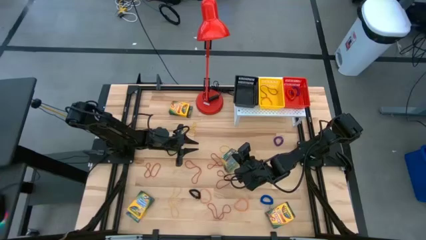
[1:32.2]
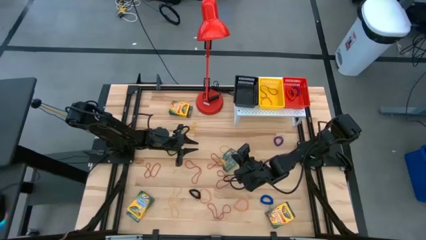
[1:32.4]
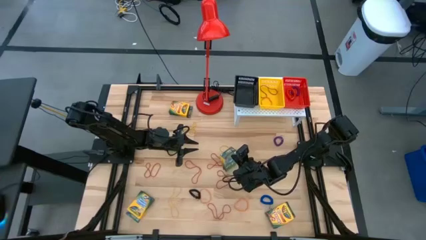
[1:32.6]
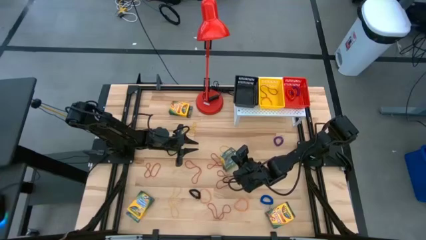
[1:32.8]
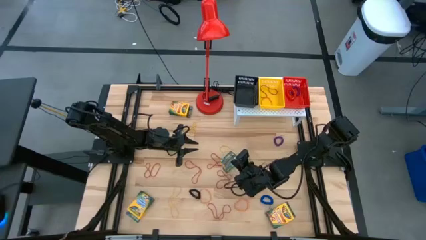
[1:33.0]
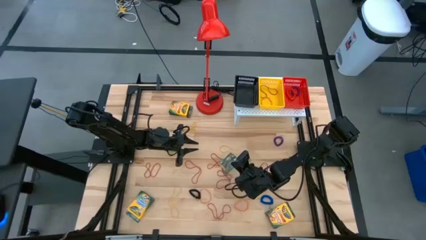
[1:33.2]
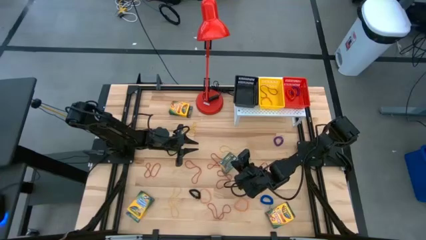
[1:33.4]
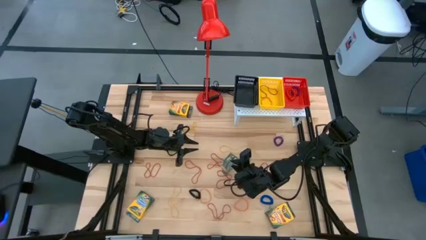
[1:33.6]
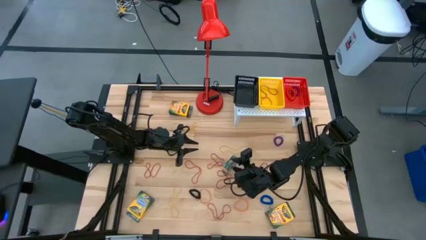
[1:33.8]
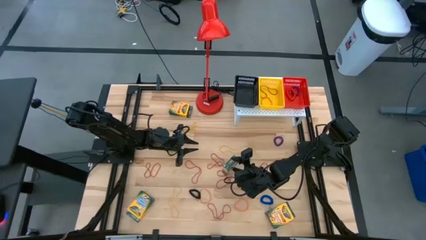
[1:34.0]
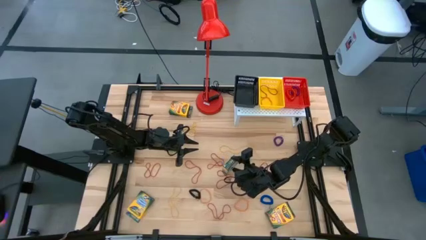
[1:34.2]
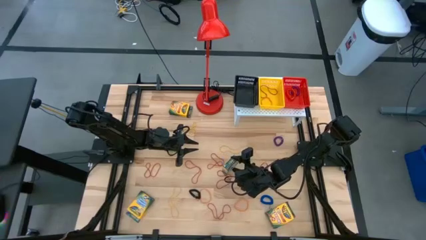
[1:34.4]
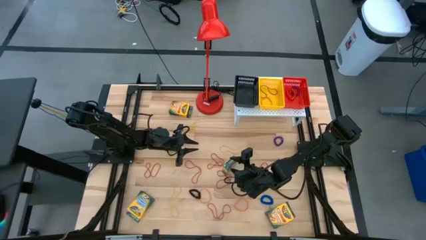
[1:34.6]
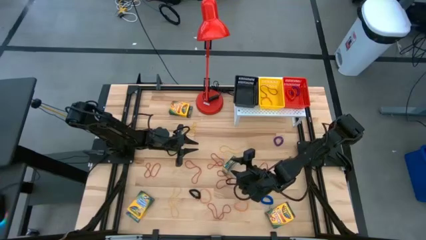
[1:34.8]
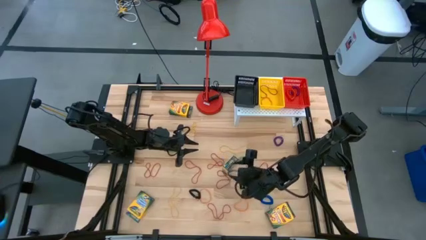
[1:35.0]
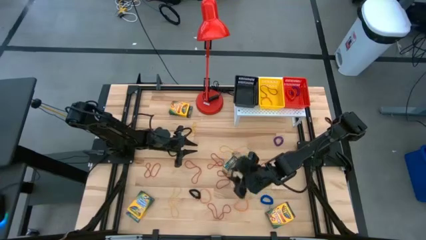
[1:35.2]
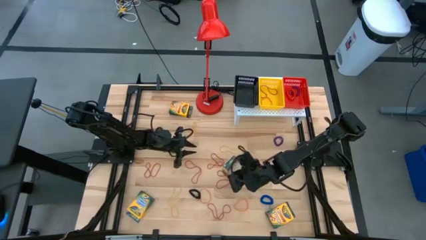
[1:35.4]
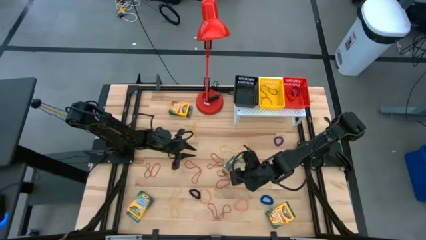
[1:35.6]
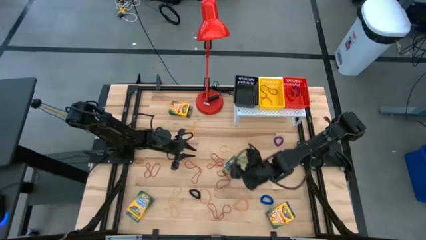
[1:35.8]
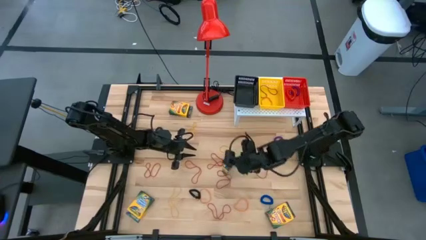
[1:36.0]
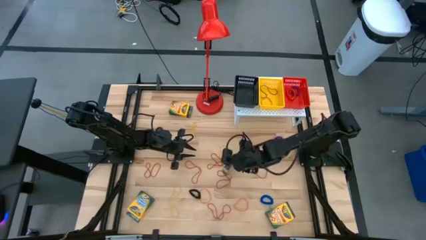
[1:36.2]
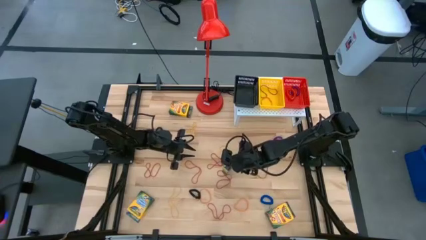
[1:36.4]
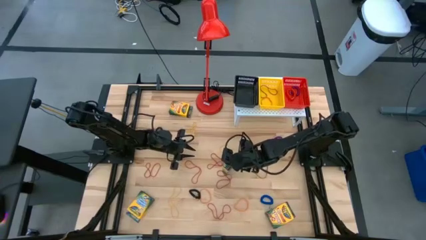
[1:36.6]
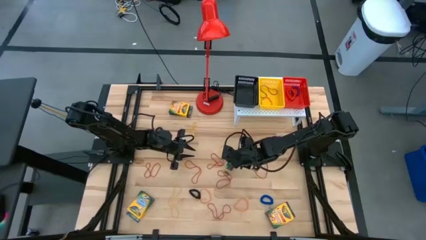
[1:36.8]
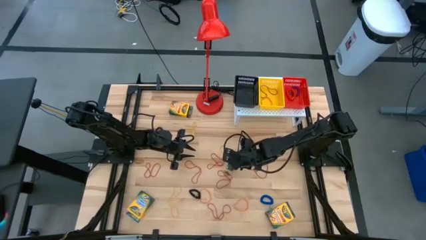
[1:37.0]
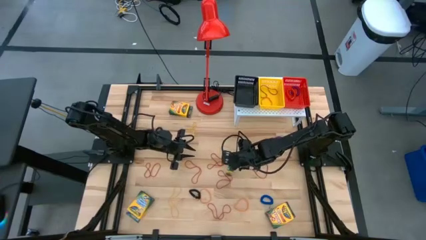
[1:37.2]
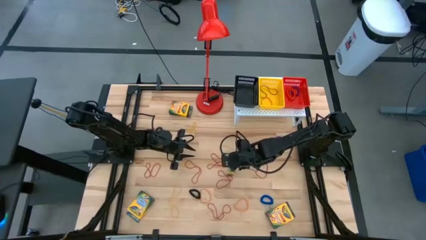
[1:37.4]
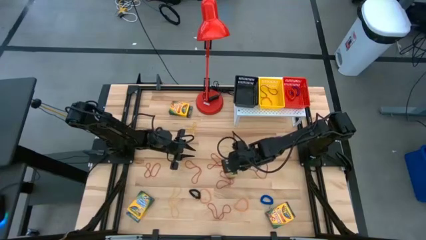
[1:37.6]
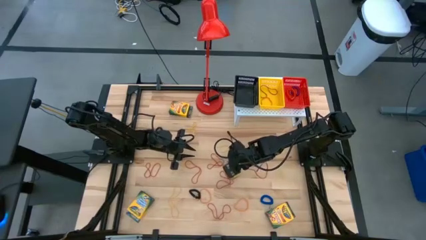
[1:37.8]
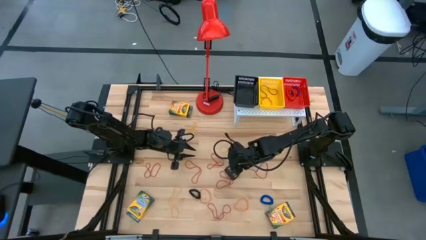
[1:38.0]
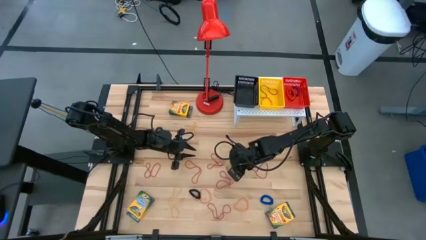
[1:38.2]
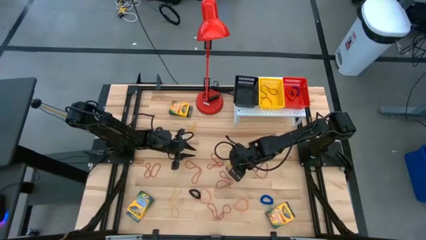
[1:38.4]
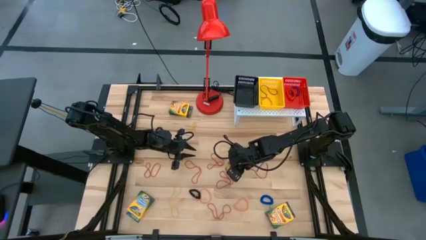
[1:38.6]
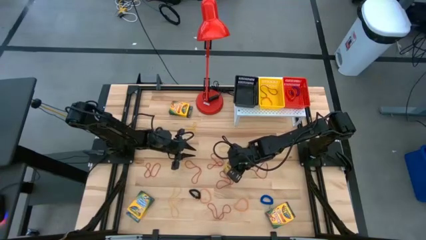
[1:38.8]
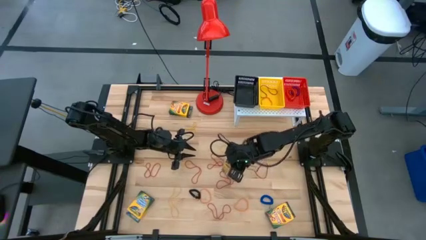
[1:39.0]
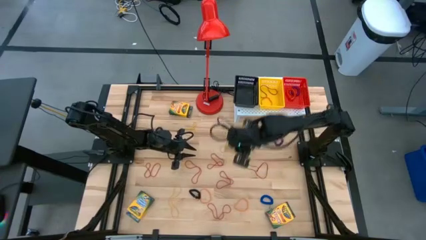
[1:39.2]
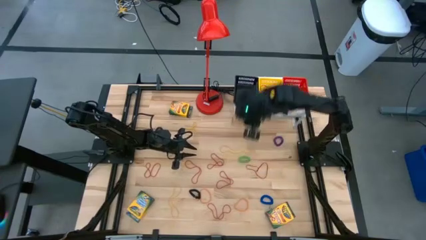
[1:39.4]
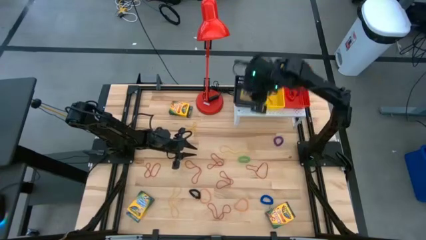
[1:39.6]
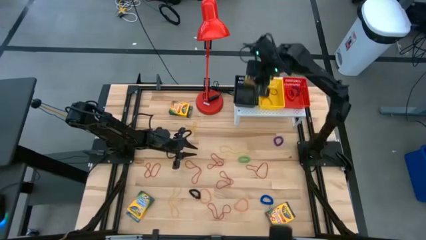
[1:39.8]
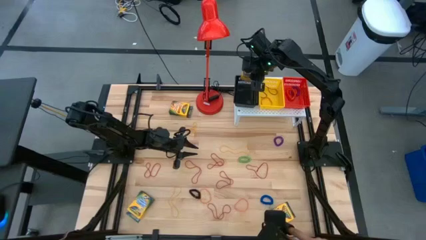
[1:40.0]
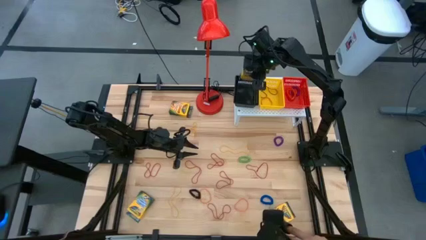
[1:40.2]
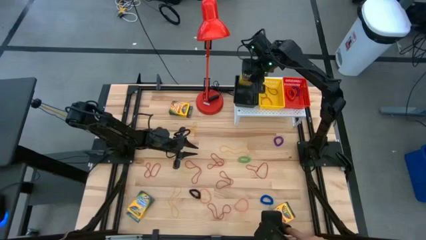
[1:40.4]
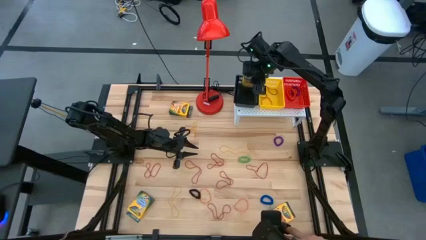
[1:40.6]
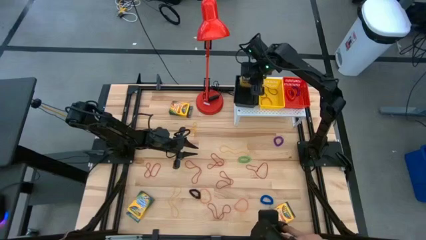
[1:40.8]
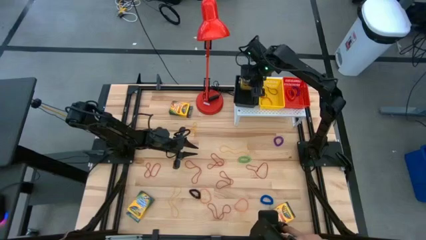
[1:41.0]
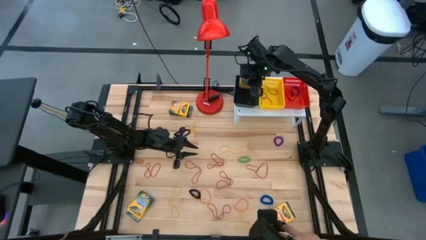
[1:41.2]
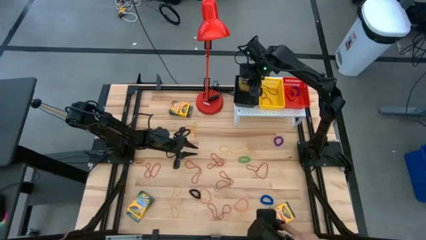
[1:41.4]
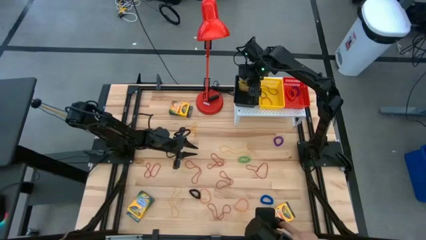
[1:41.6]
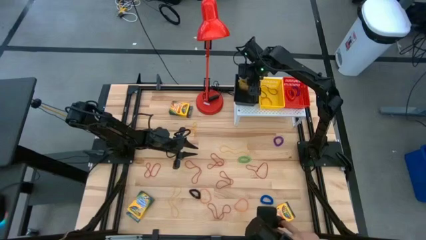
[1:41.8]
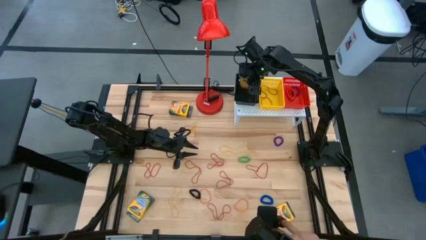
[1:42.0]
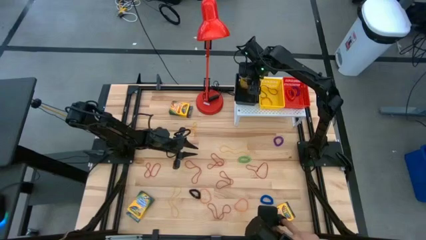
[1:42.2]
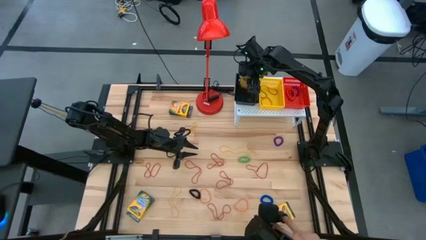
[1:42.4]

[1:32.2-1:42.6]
Task: Pick & Place Office Desk Supplies
Put the crayon box into the black bin

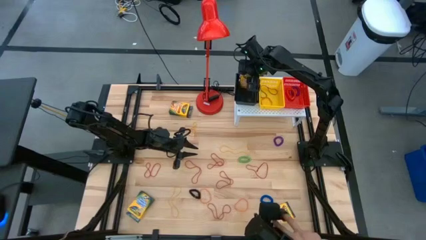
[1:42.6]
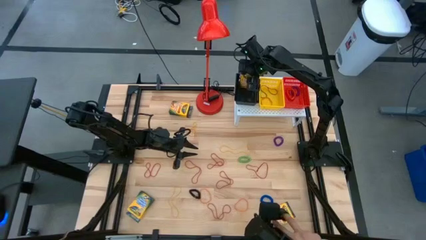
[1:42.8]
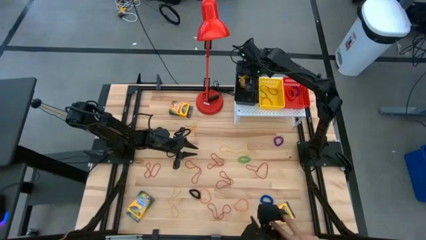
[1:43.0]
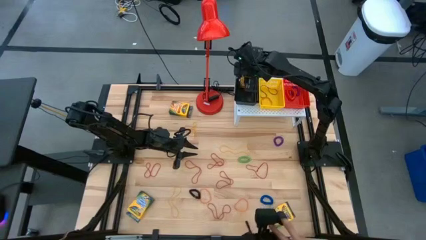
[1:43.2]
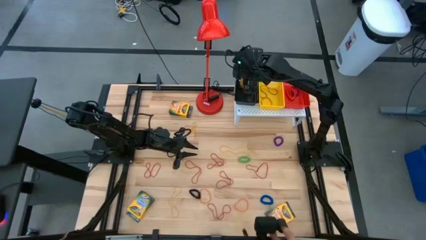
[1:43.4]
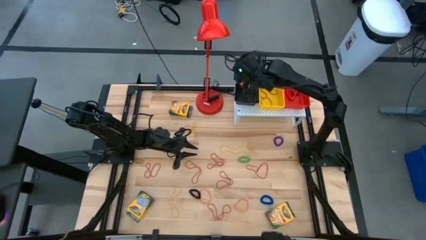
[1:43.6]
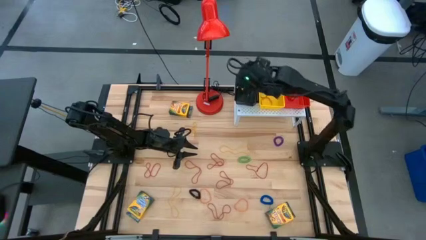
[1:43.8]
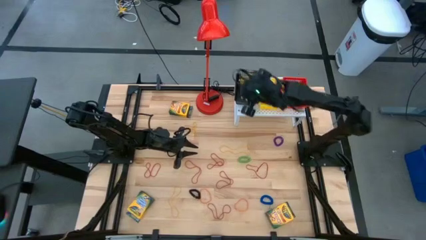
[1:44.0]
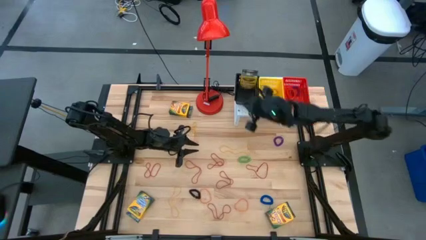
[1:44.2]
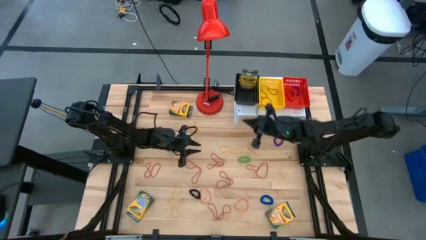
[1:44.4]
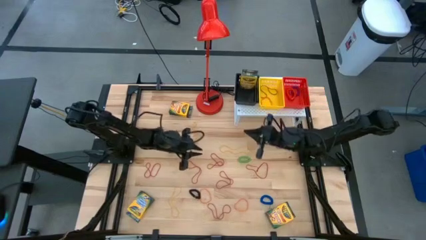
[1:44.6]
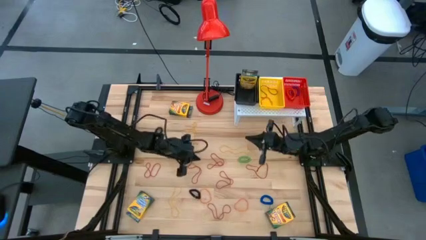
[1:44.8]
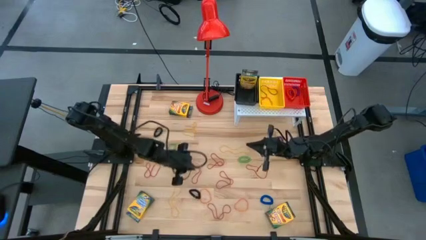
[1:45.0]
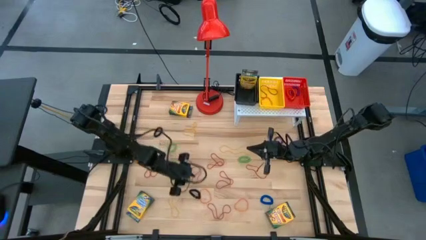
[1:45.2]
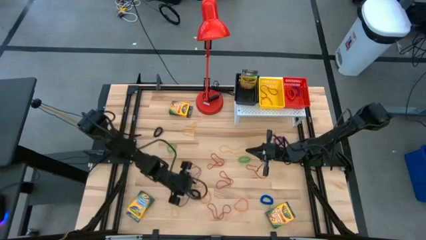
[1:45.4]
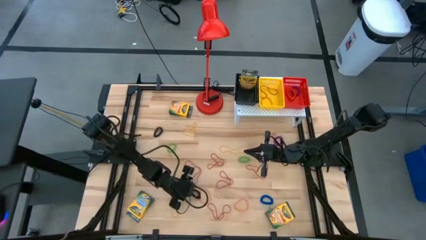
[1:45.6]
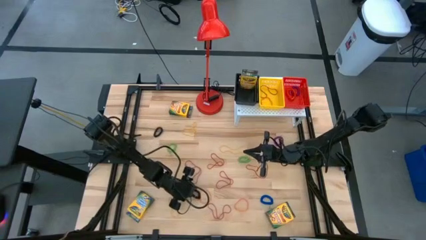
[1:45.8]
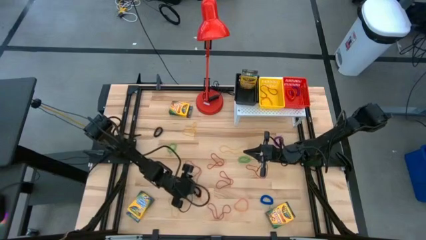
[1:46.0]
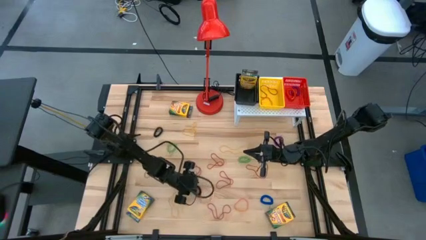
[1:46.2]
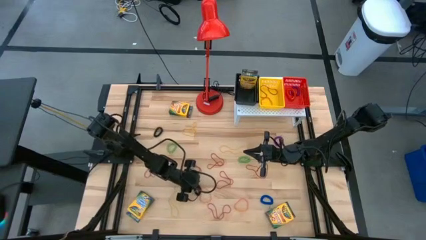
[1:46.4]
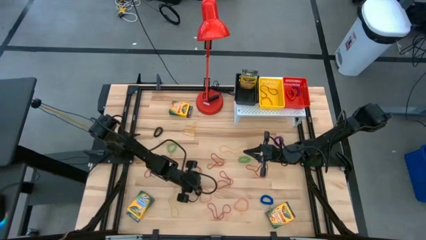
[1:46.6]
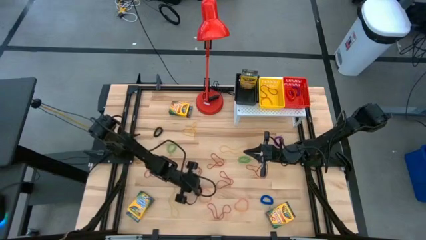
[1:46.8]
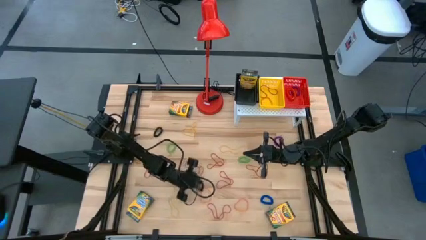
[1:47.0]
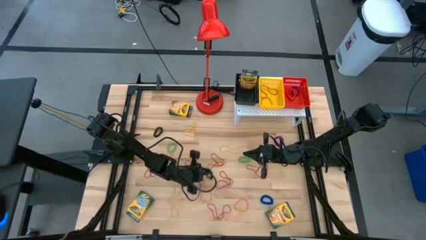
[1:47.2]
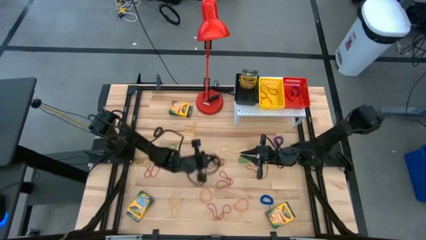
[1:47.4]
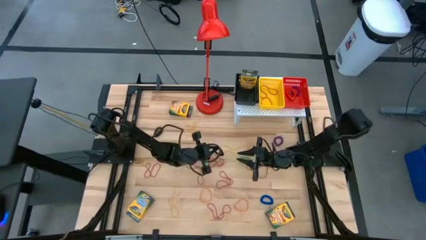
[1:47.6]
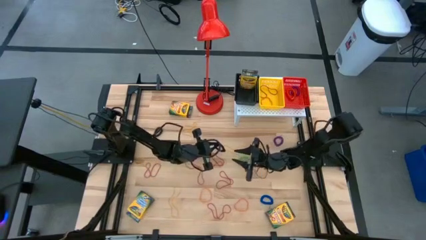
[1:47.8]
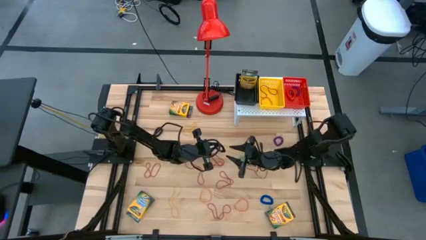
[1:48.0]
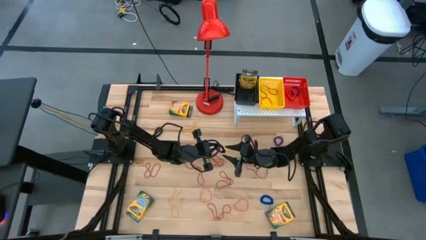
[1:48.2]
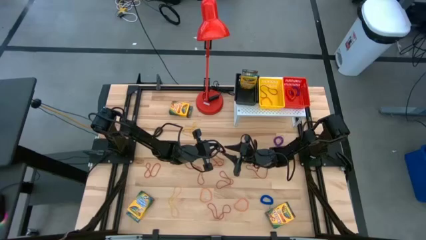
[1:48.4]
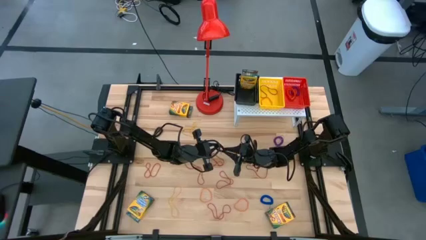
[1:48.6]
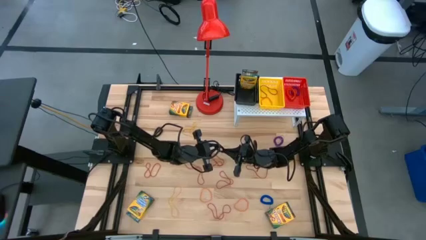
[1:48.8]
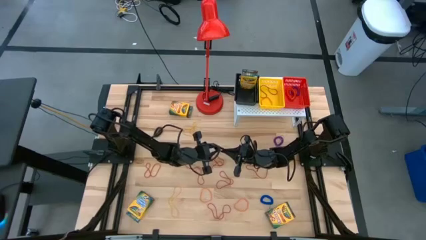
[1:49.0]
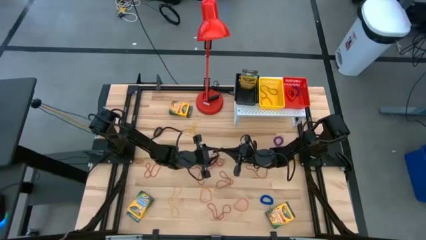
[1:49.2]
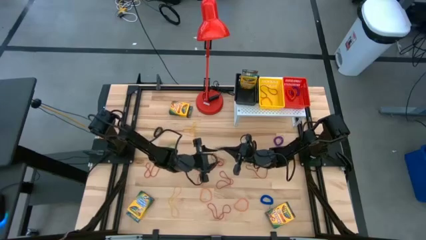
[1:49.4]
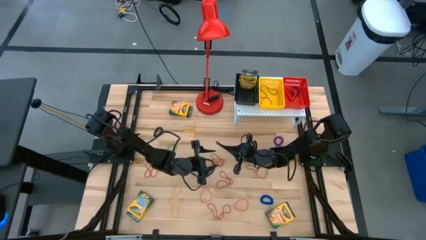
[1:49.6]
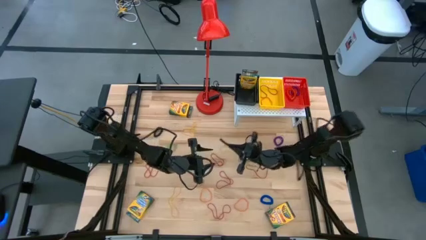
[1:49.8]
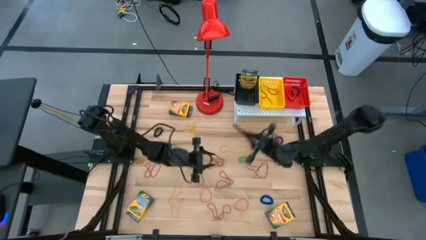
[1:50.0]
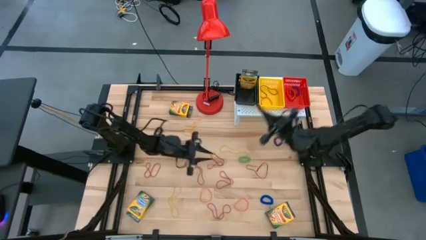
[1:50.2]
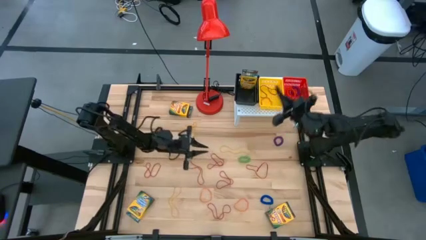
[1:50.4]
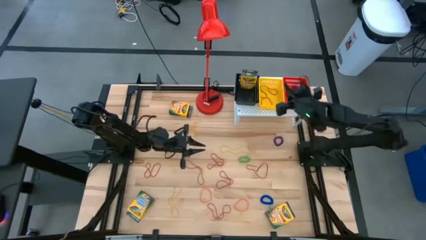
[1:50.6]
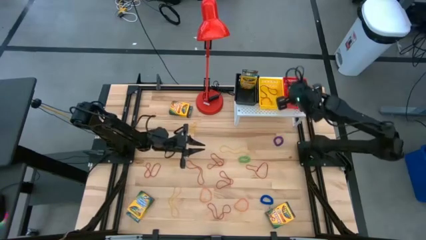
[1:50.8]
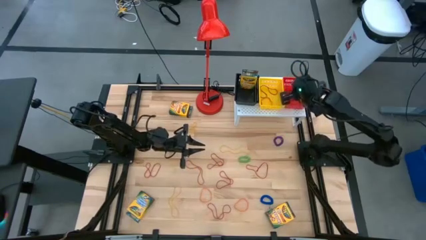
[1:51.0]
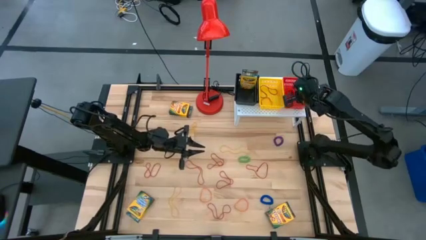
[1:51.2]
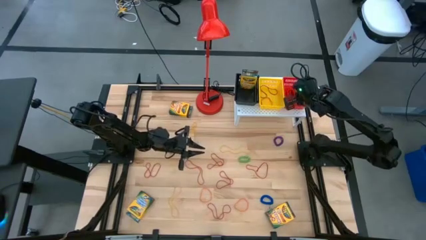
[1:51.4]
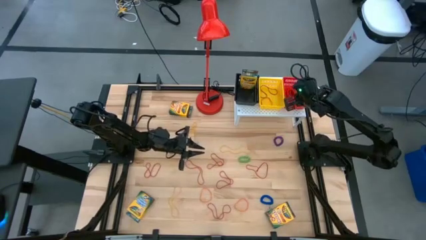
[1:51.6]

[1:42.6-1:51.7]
Put the bottom black spring keychain into the red bin
